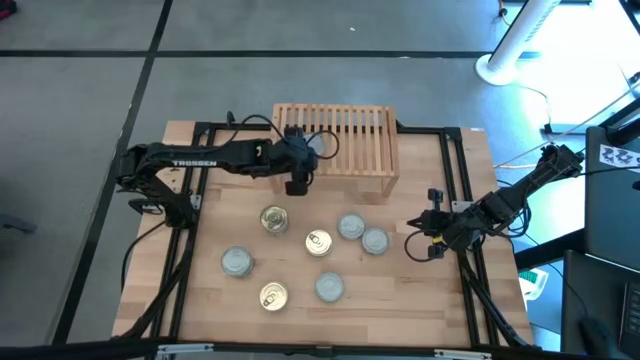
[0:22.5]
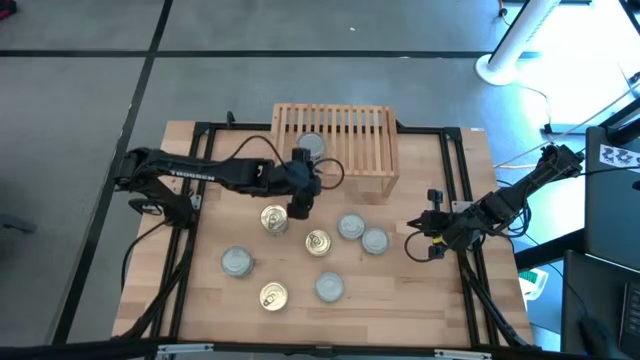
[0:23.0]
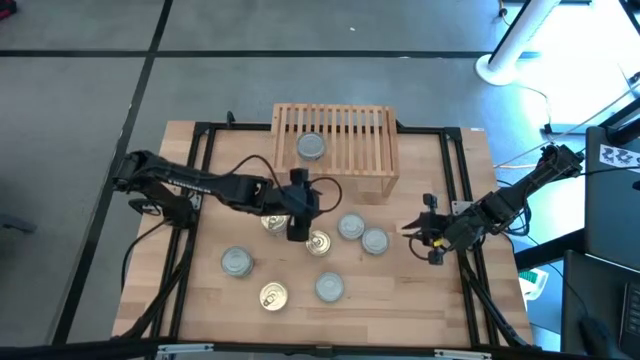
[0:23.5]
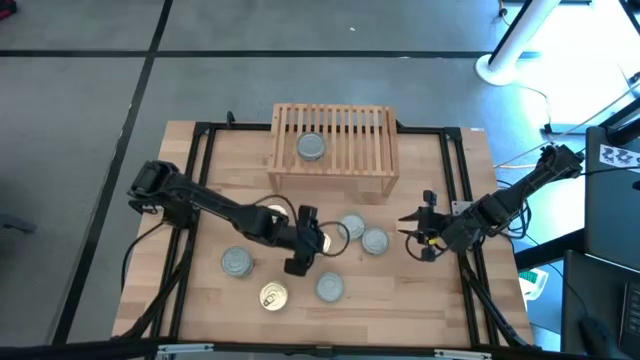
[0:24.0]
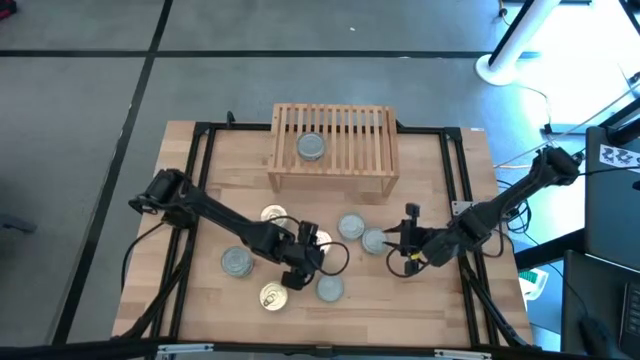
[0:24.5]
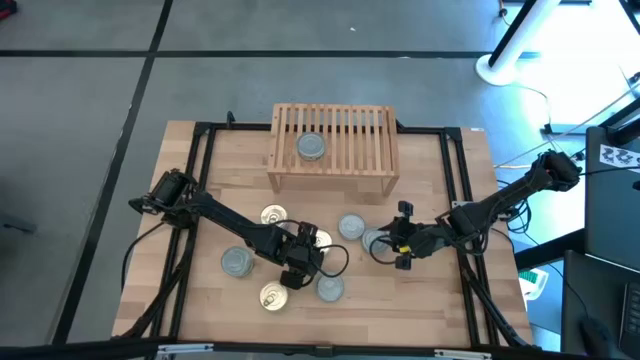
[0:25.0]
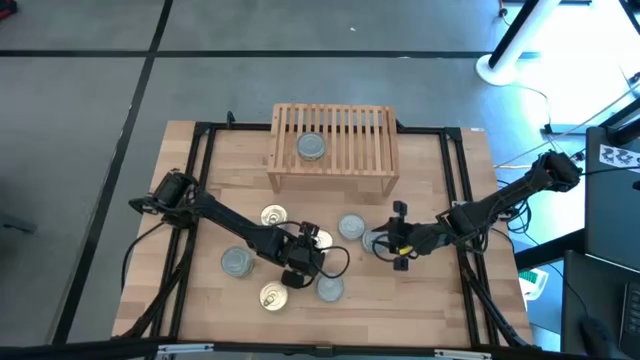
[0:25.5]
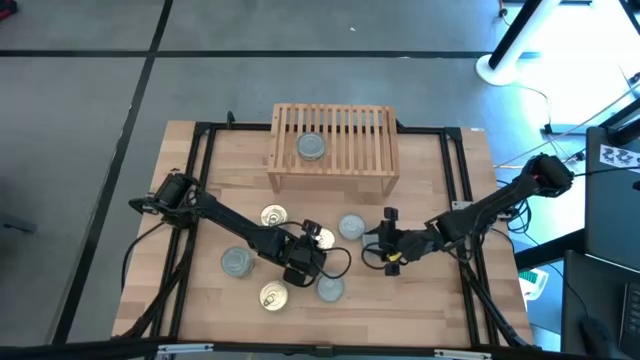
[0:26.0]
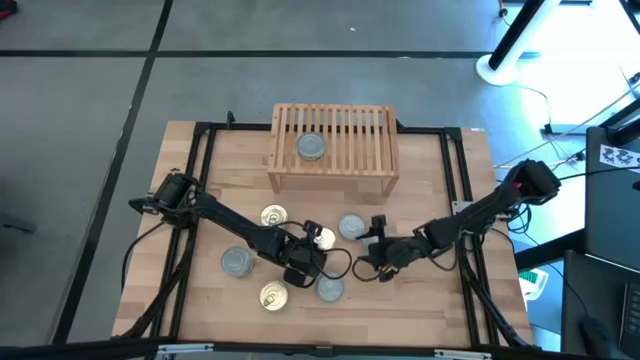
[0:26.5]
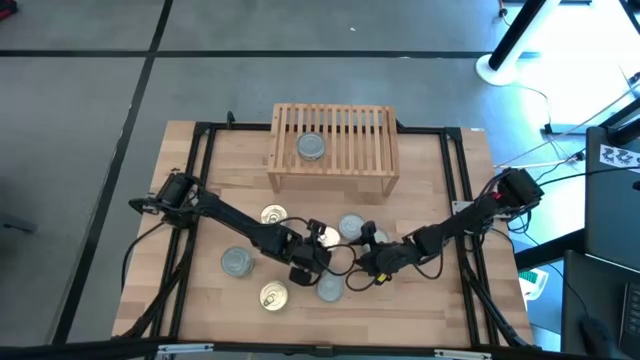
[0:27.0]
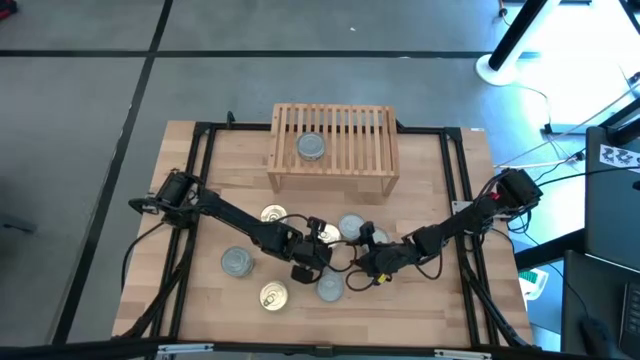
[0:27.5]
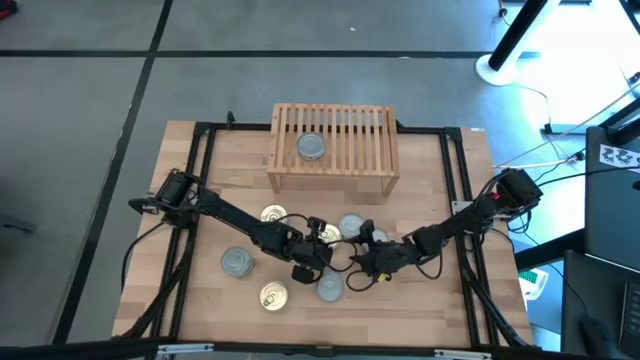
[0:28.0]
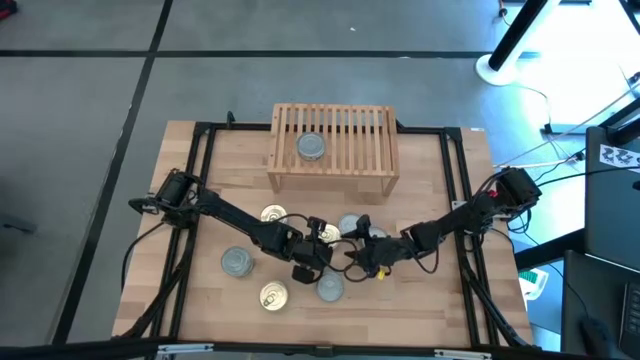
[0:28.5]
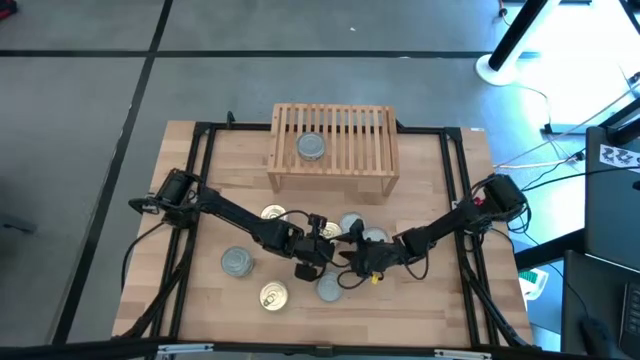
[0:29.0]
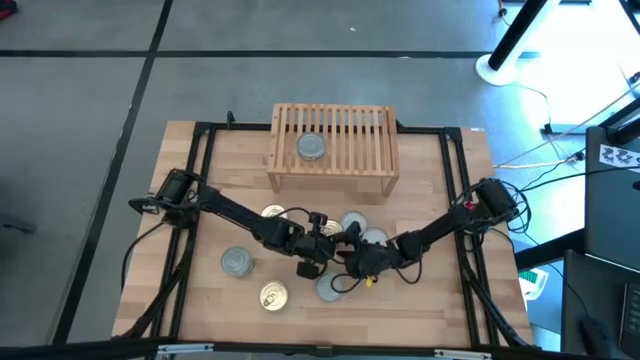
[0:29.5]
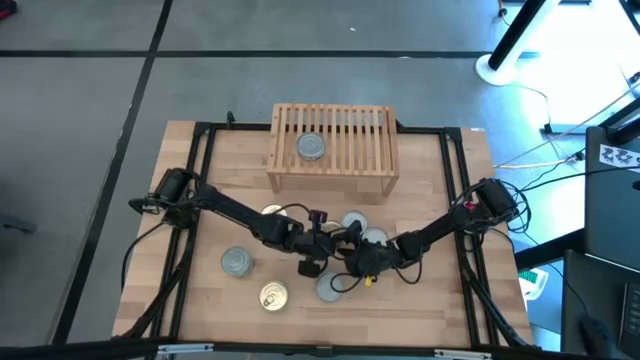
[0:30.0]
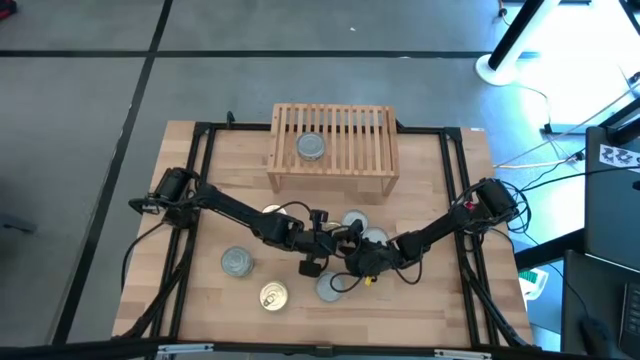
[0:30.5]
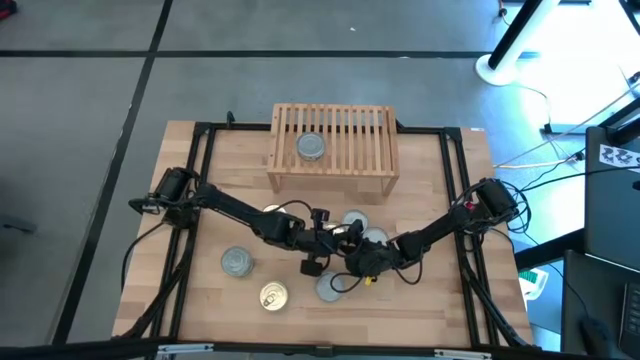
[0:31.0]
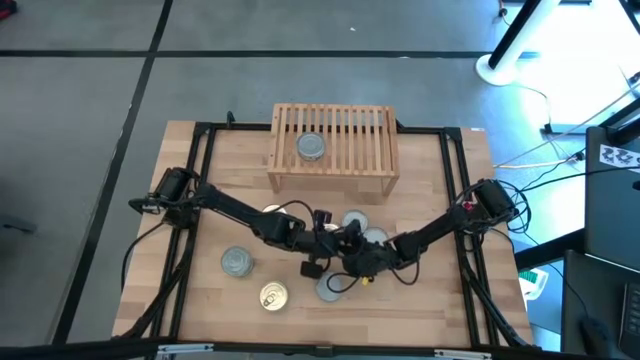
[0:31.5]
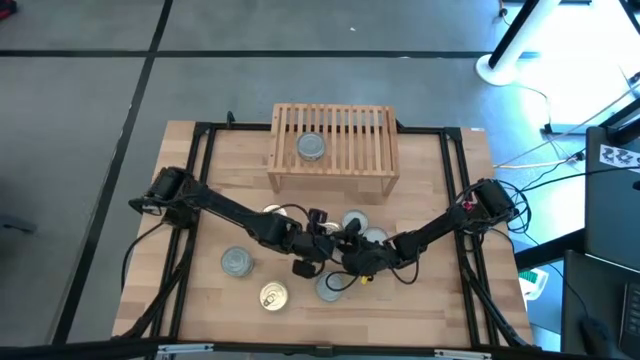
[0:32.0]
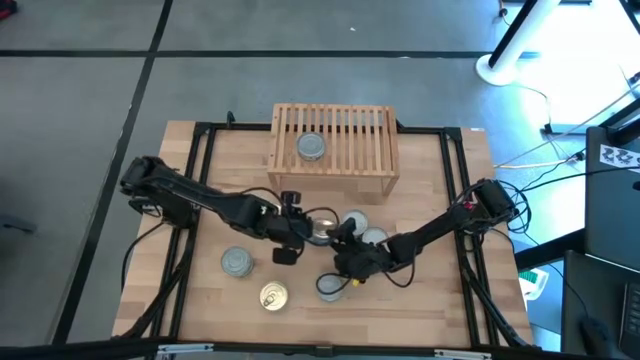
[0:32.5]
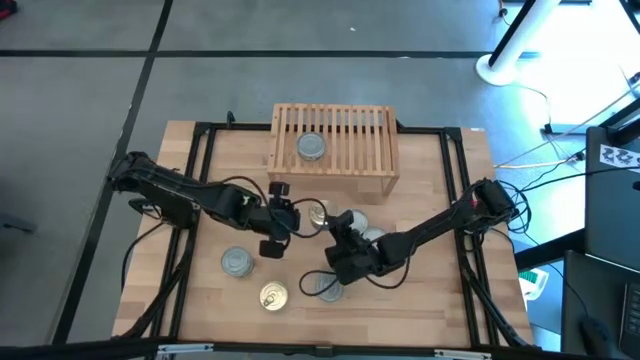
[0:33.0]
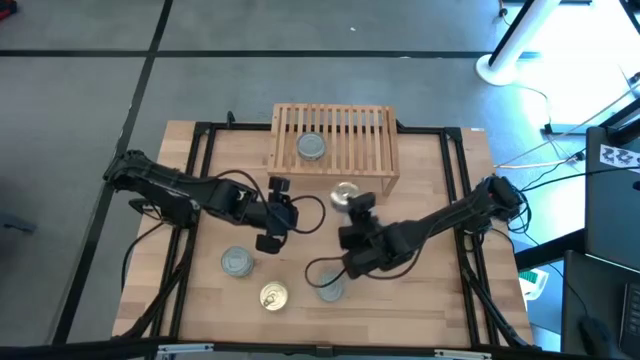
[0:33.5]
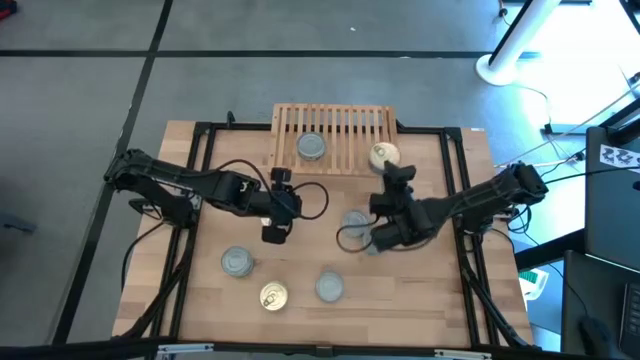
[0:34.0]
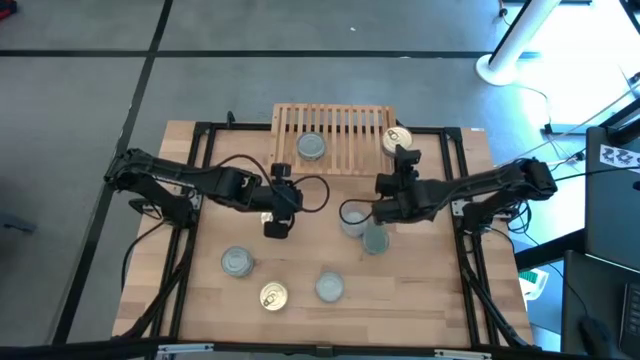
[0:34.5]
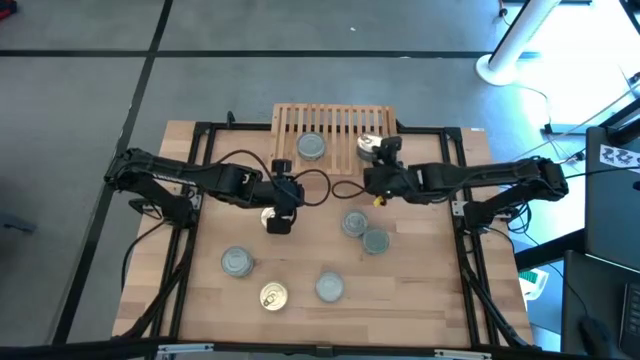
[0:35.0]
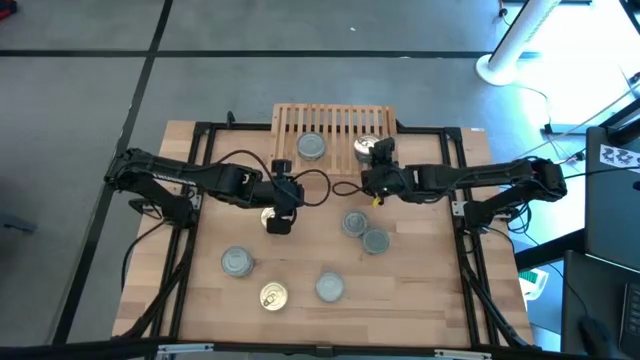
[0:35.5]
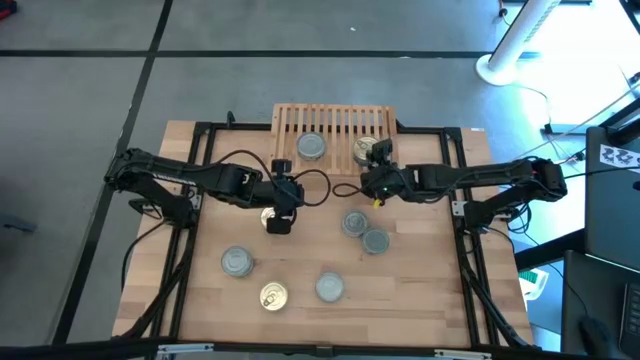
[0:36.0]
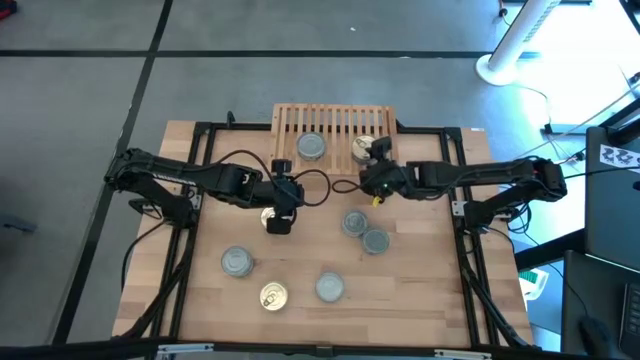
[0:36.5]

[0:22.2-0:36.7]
Task: Stack canned seafood by type on shelf
Put the blue pink tuna can on the shelf
